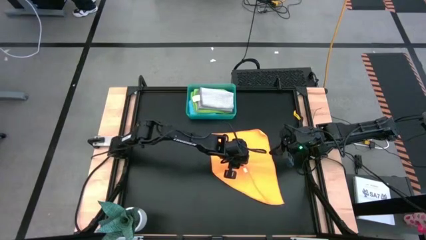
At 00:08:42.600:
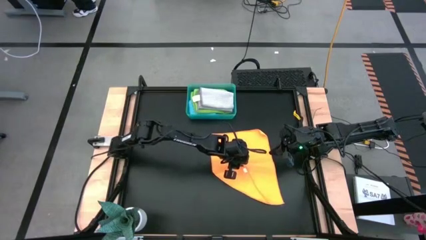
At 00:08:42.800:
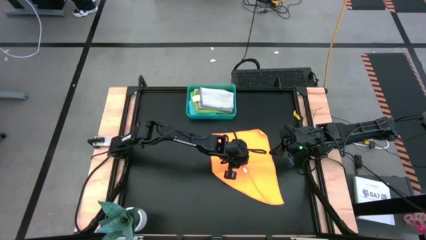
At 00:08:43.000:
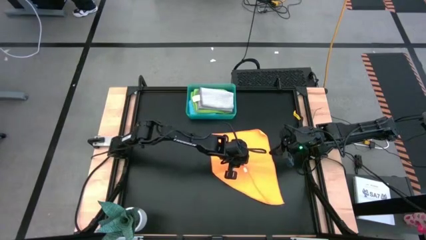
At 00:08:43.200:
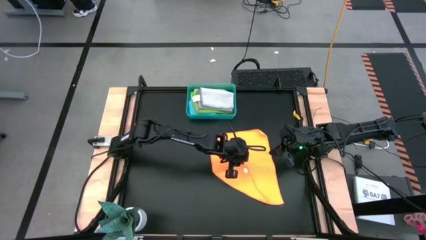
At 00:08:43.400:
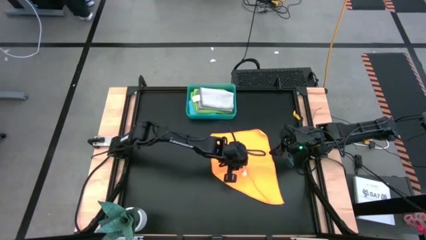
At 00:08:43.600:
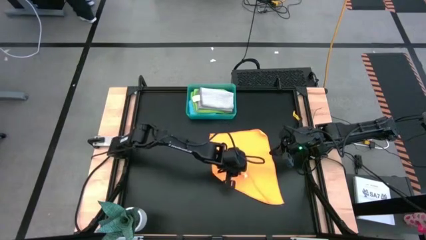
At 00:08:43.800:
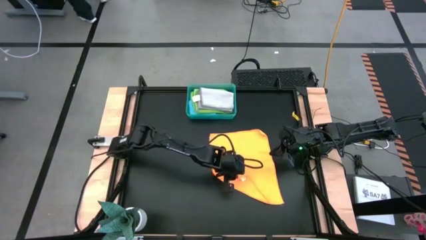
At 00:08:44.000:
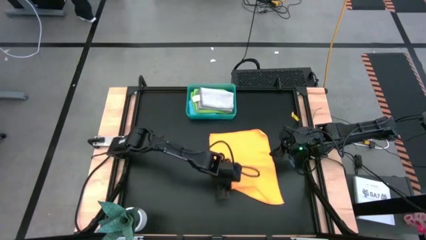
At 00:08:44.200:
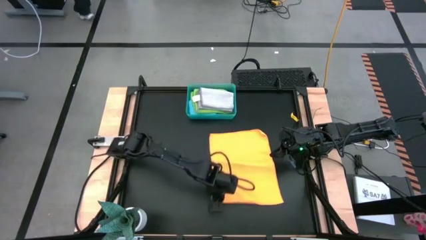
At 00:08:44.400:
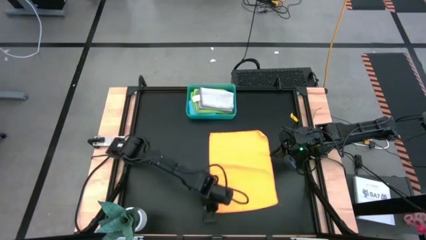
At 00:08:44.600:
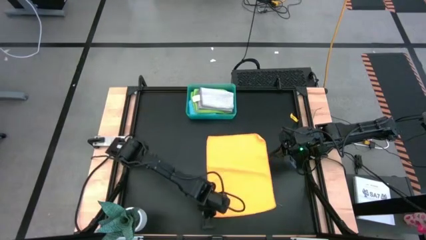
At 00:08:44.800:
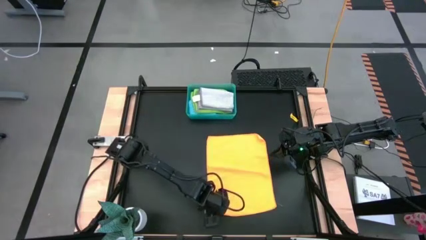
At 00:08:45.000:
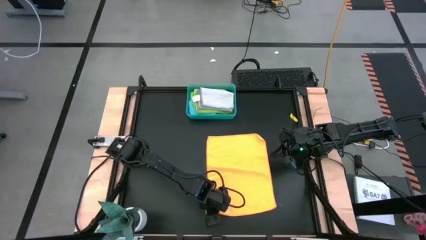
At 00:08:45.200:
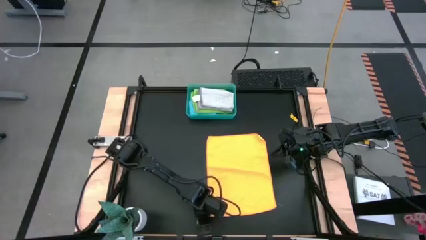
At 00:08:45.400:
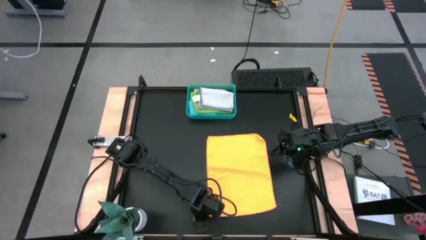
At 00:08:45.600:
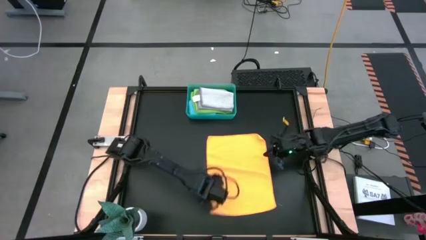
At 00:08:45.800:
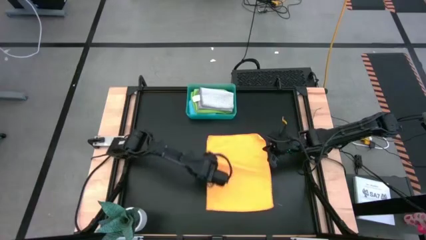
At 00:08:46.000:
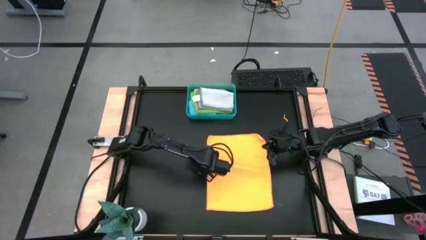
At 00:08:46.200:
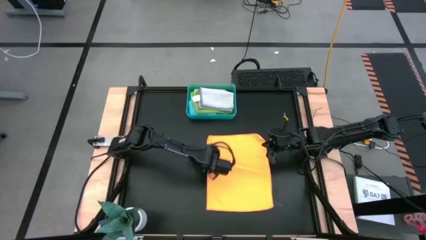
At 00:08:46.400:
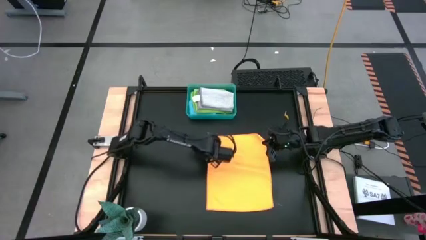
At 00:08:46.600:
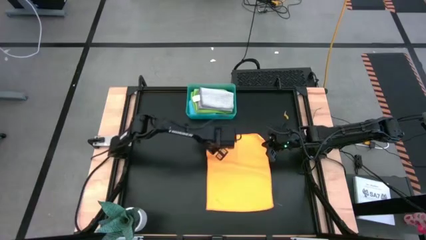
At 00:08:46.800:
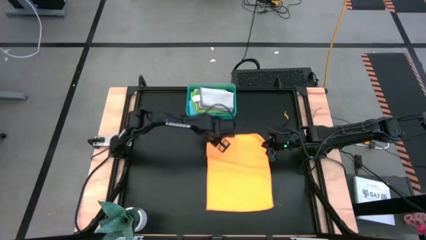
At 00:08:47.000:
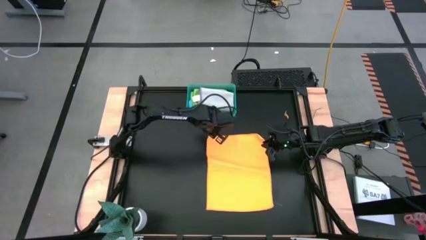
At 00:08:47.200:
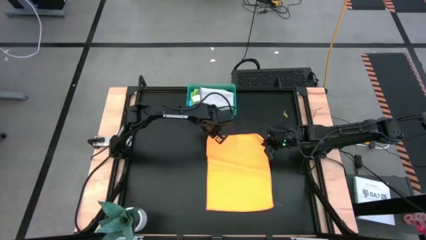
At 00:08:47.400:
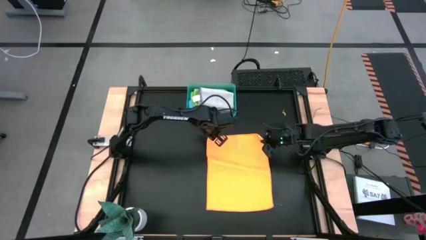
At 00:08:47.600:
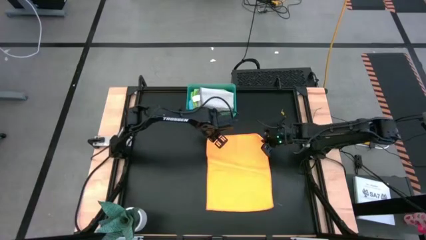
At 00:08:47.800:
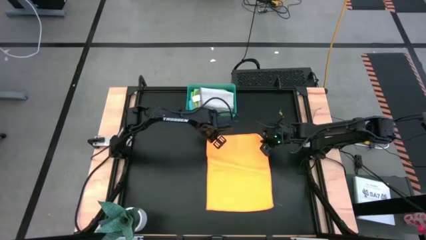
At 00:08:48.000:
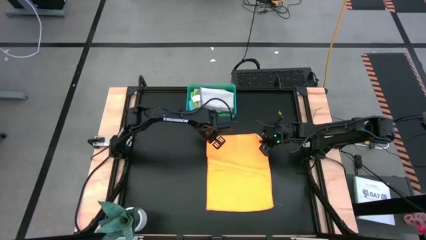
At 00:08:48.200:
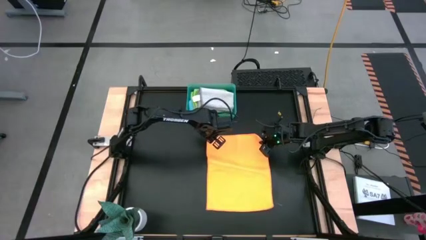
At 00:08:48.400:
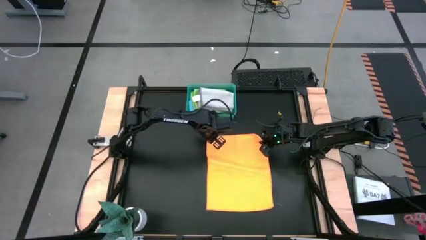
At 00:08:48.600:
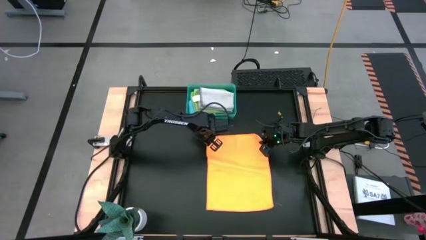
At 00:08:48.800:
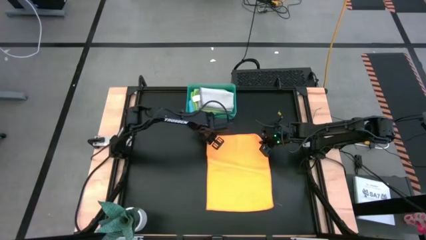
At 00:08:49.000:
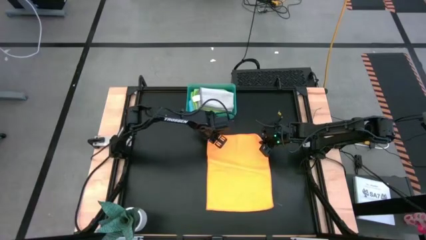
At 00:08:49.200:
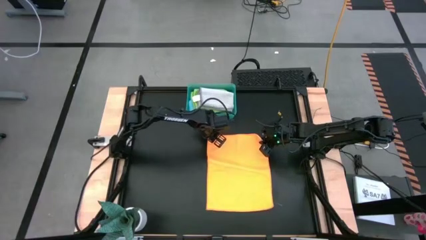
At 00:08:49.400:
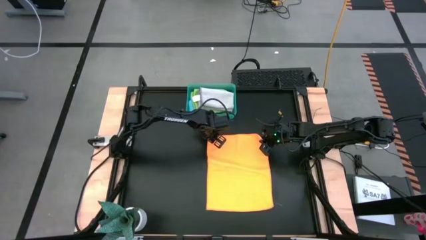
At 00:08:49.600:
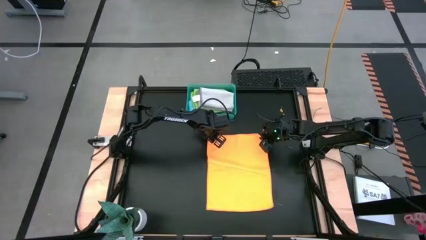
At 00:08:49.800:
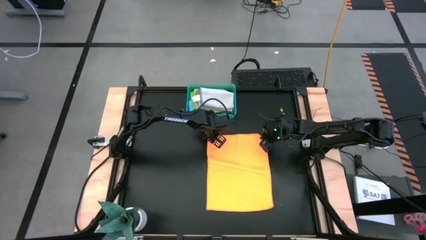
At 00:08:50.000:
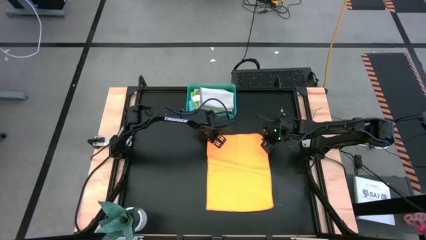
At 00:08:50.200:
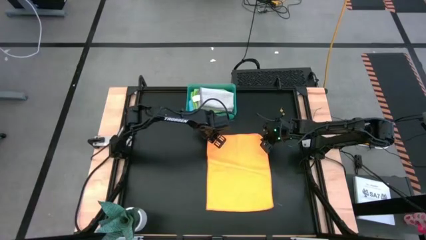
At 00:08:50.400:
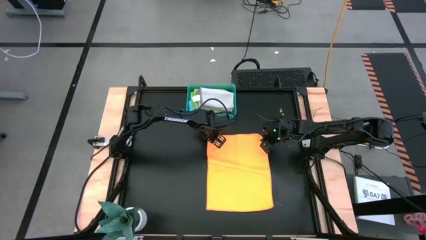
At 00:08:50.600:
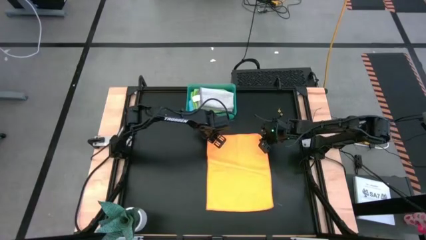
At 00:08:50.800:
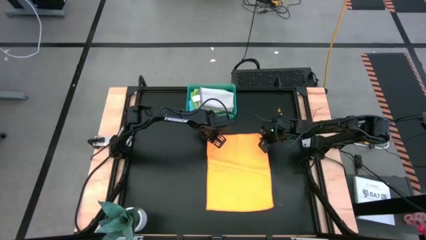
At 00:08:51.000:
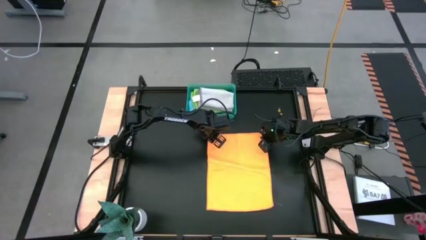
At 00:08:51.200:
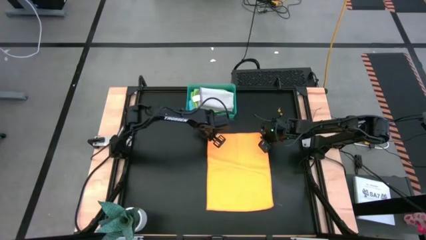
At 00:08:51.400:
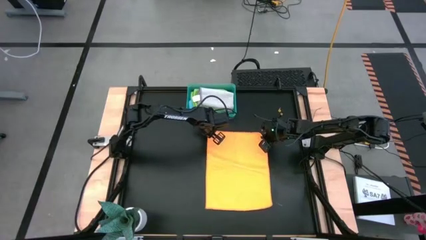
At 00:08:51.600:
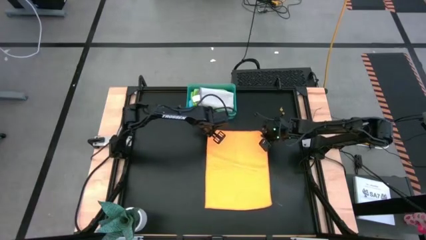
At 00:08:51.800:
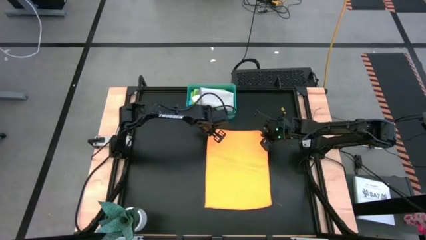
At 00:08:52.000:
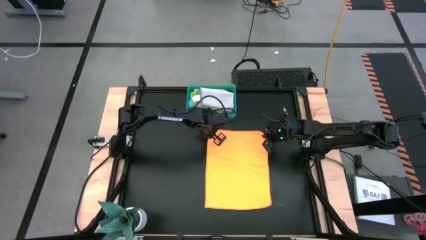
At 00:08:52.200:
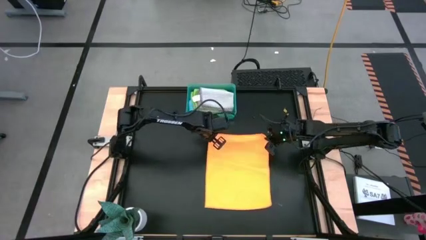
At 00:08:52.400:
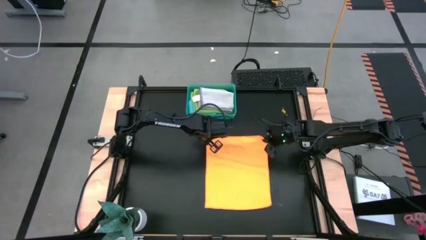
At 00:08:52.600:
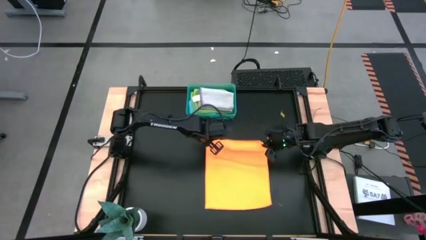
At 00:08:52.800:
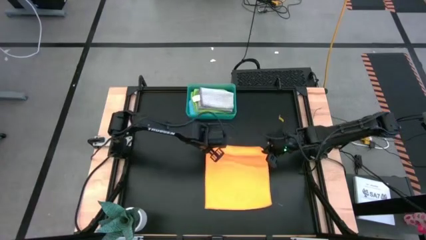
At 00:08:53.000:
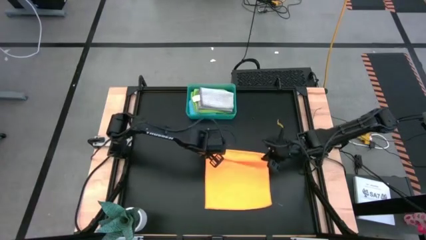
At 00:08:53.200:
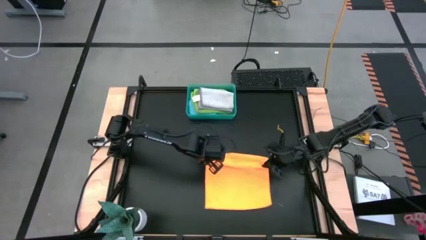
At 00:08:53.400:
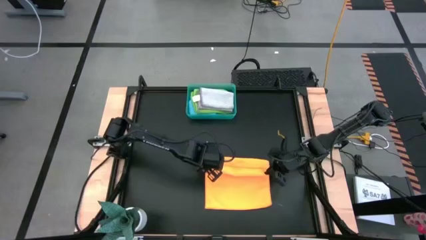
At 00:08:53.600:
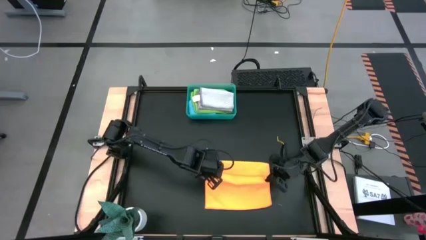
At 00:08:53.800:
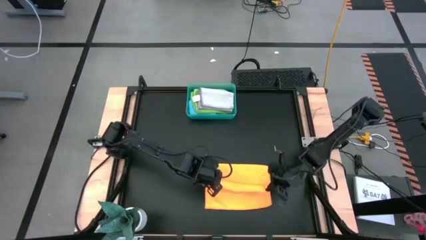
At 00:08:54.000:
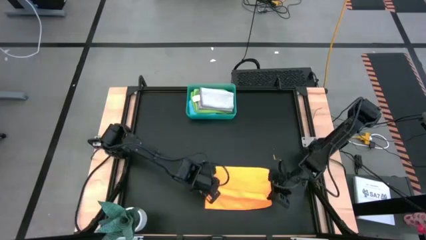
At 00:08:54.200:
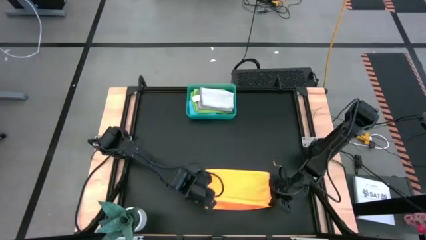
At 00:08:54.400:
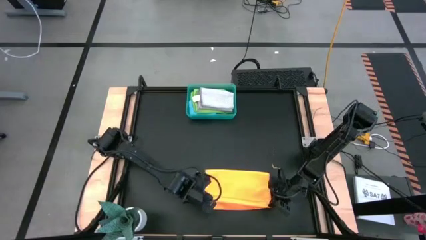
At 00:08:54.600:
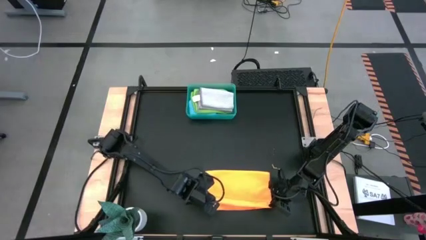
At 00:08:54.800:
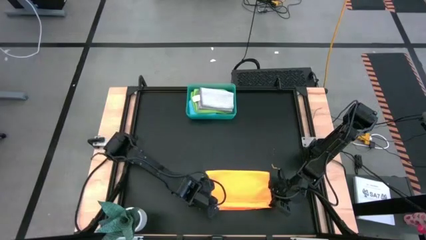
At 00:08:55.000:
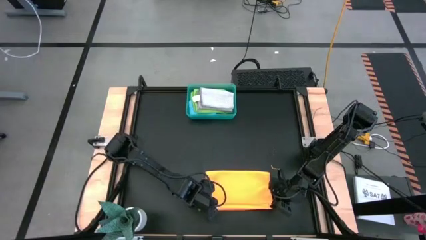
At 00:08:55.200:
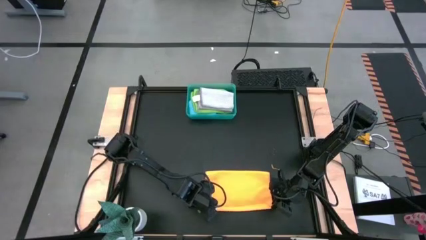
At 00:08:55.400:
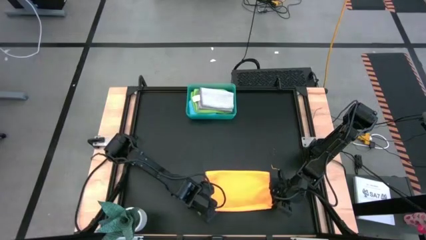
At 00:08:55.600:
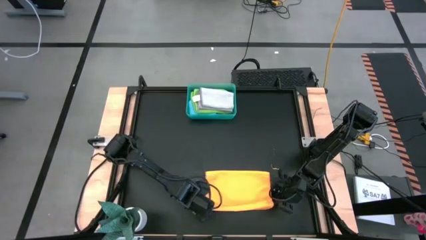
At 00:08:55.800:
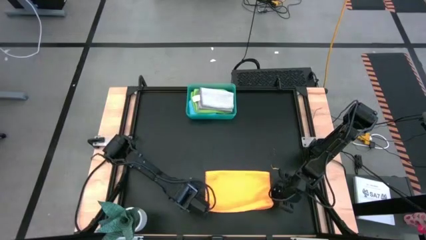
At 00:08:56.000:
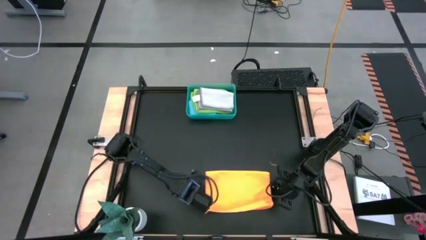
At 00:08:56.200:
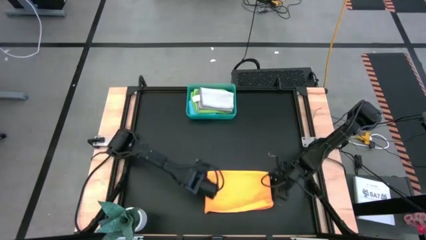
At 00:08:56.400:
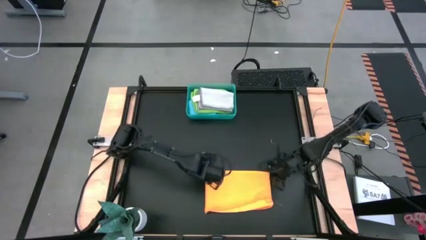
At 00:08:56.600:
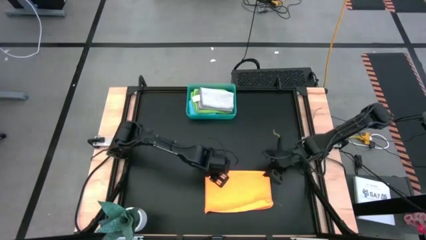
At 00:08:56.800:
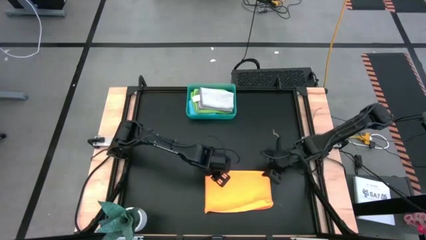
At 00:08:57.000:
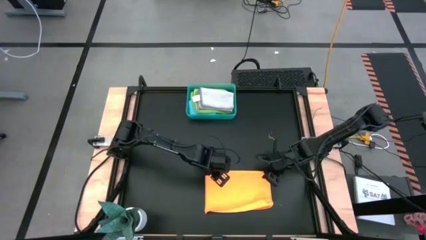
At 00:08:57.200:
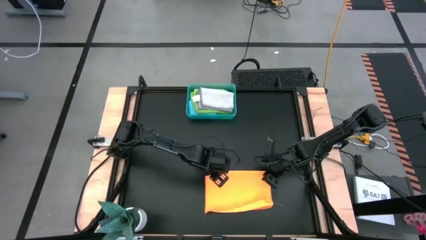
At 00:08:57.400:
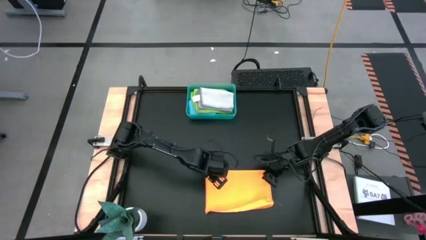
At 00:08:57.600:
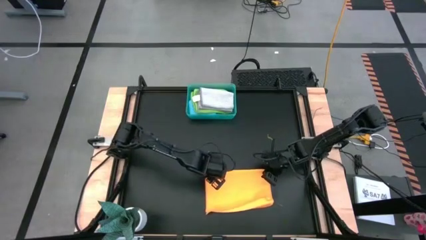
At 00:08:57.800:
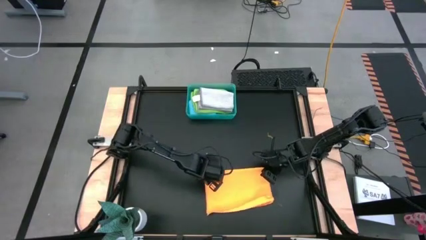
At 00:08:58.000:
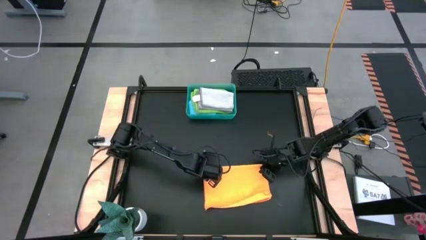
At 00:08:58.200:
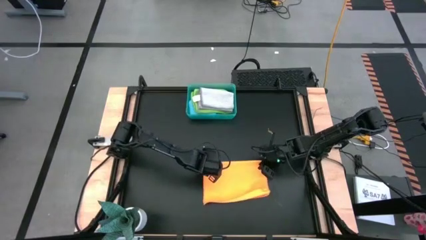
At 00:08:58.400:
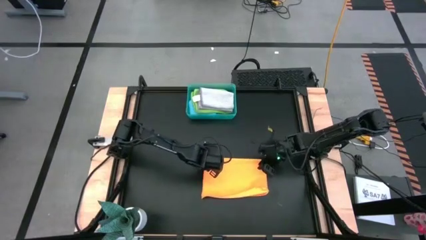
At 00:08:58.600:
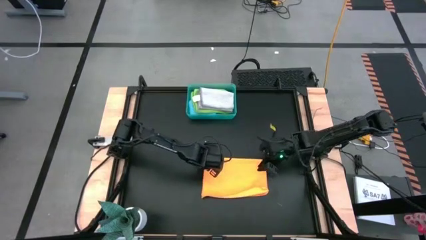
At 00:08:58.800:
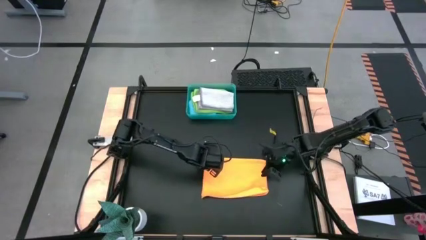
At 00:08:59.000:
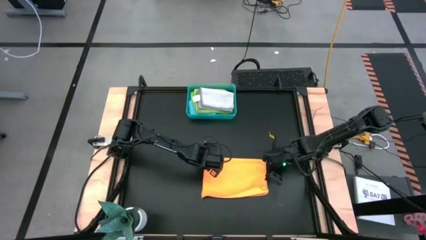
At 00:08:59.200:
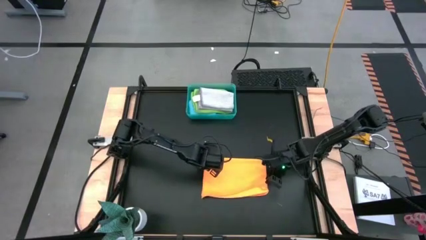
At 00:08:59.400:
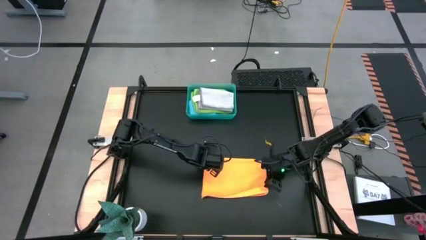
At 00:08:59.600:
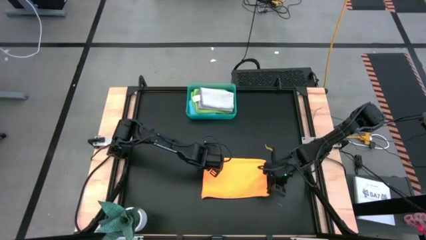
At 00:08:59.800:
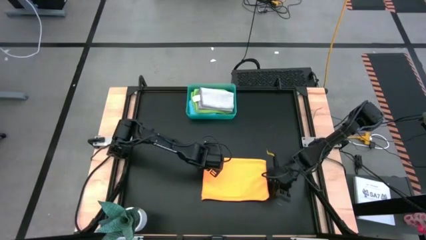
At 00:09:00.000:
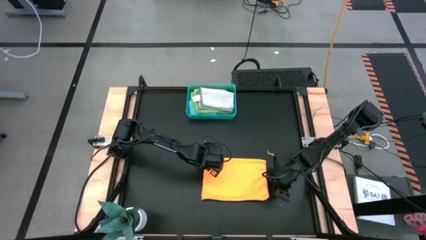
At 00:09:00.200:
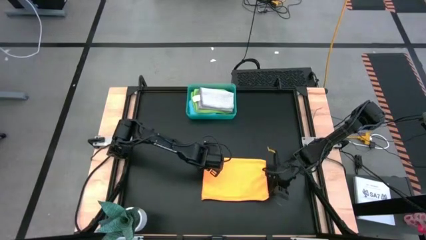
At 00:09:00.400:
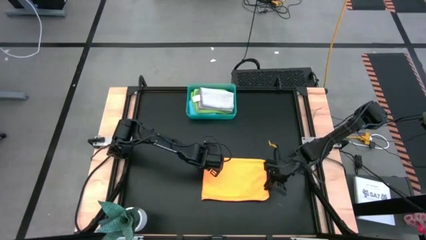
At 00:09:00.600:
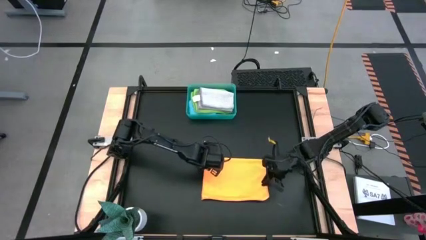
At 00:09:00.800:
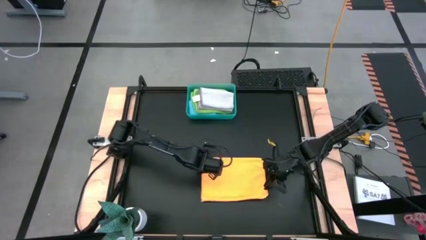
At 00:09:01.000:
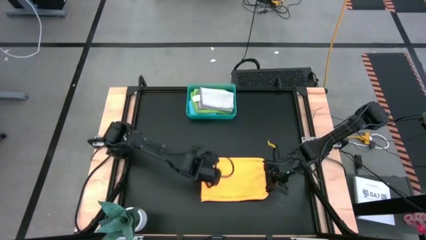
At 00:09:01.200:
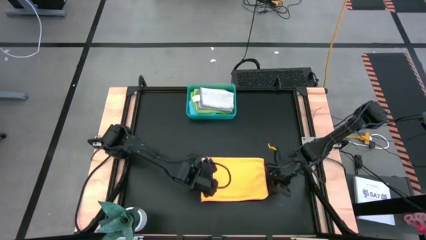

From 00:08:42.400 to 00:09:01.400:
Task: Fold microfiber towels
Fold the orange microfiber towel
